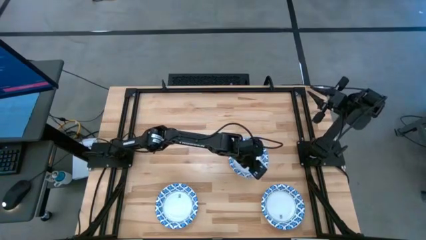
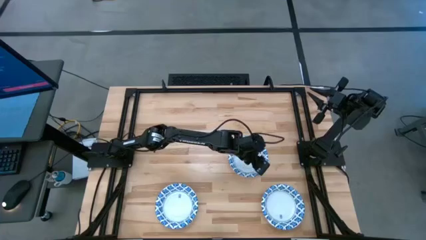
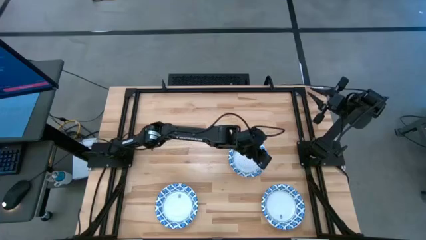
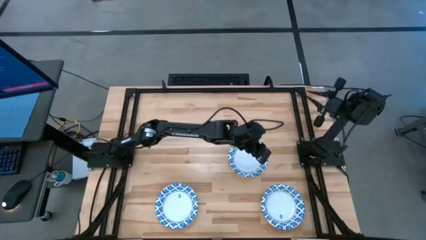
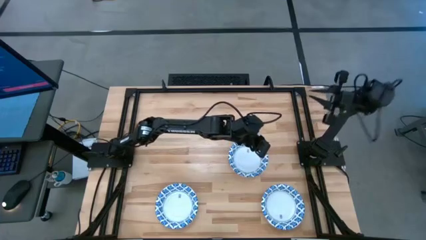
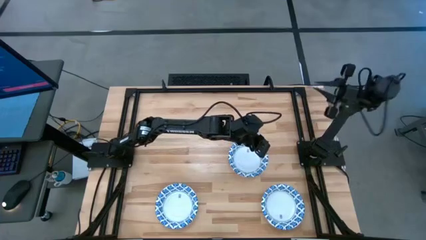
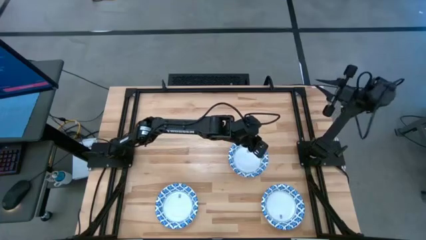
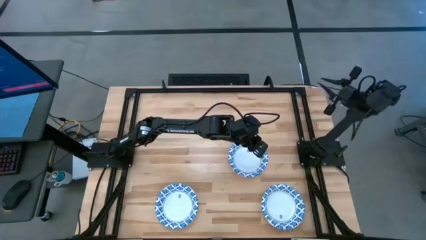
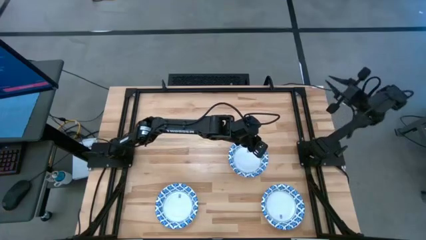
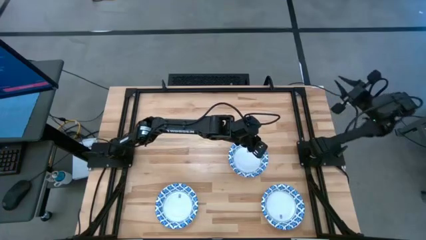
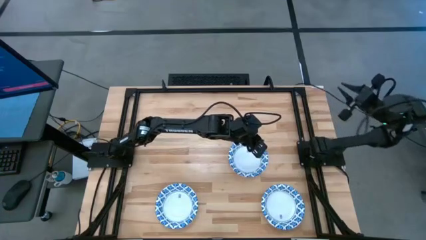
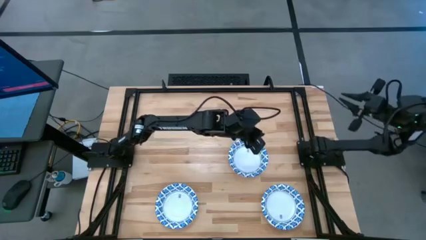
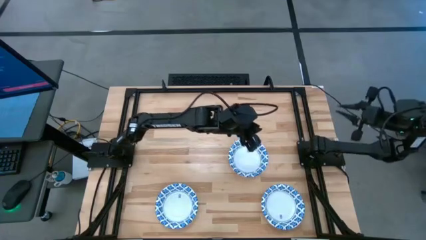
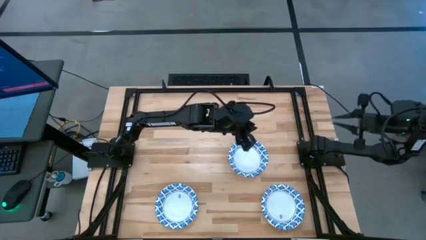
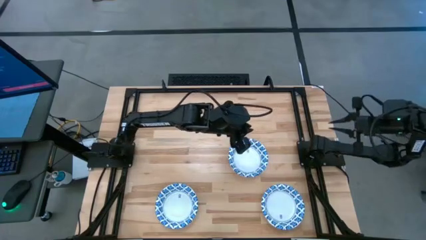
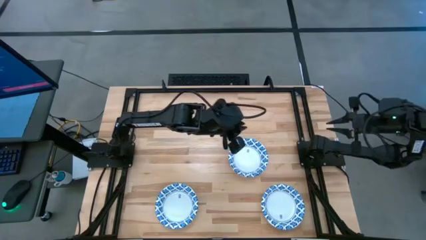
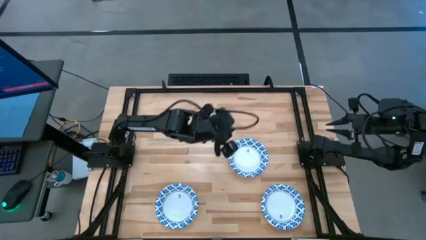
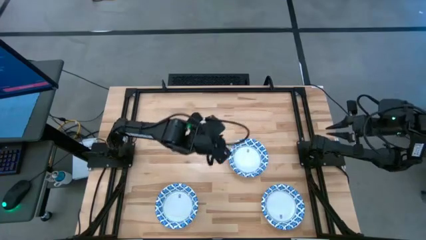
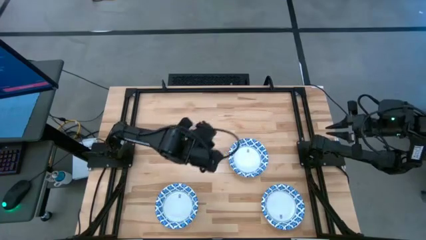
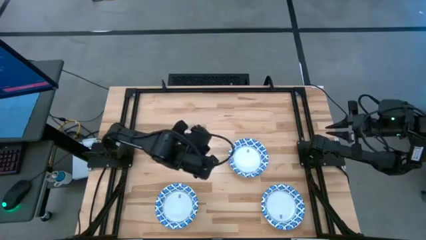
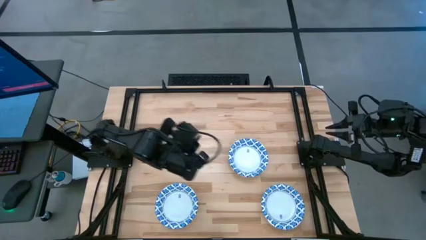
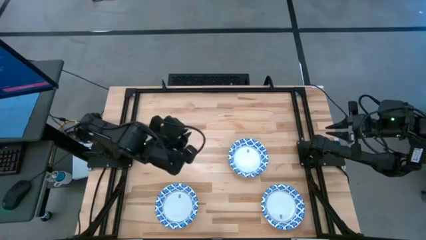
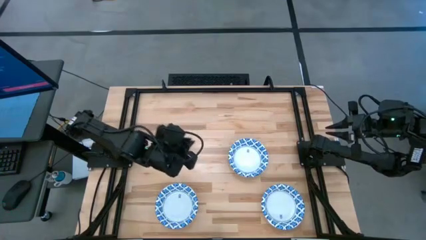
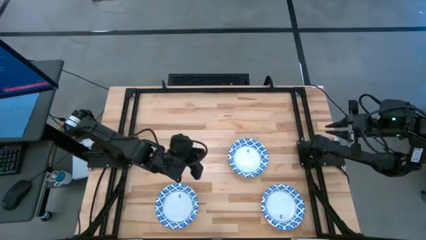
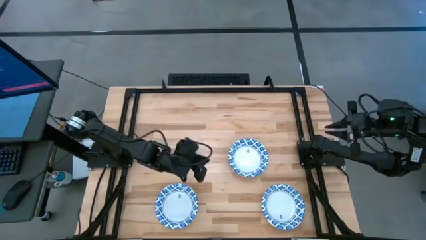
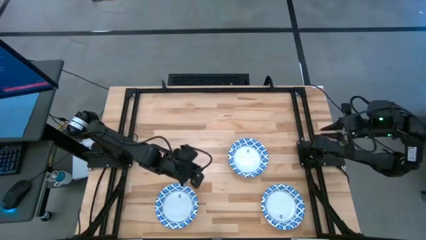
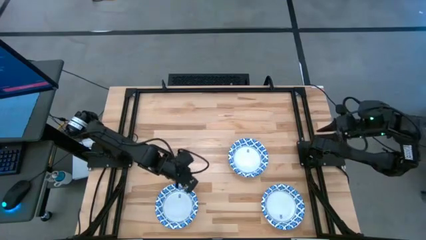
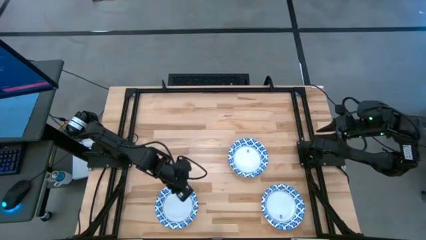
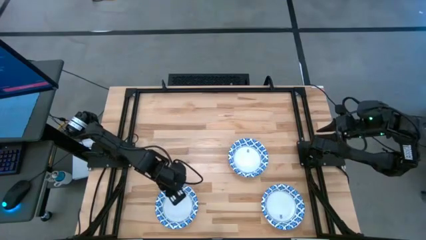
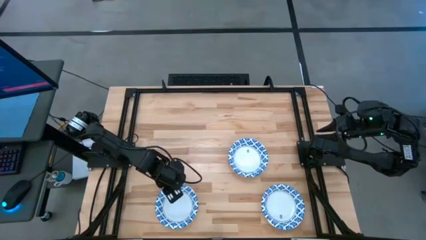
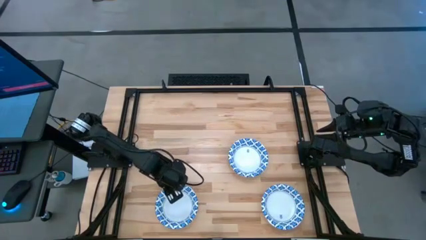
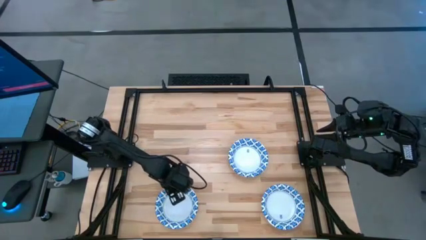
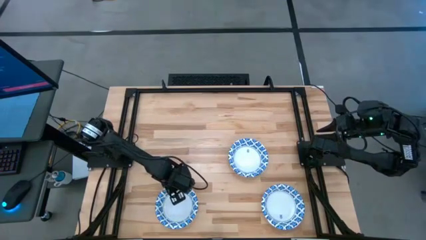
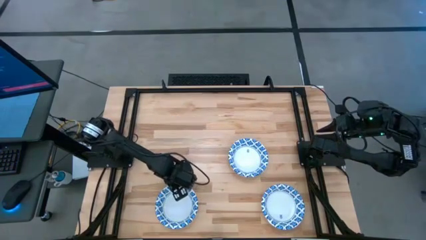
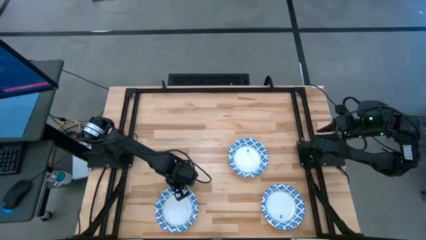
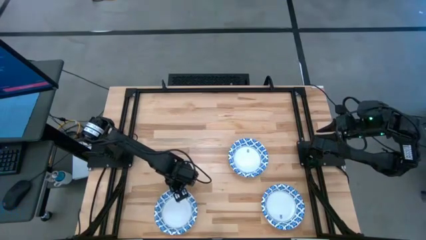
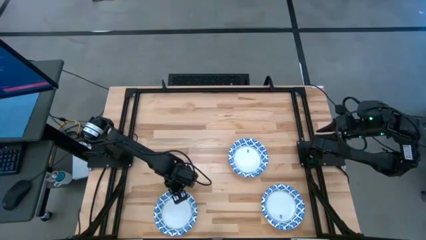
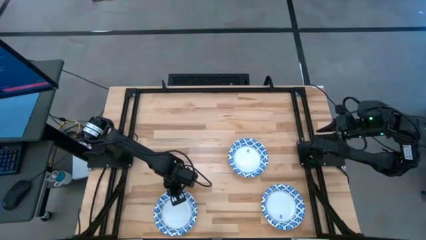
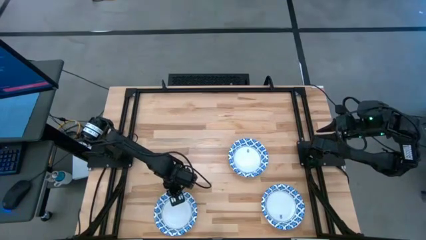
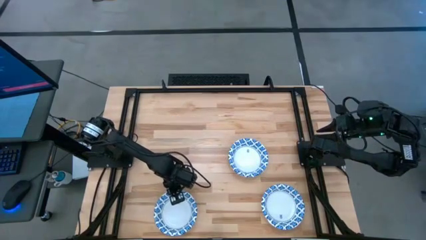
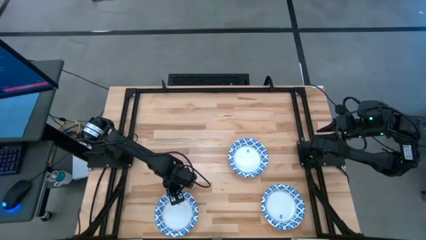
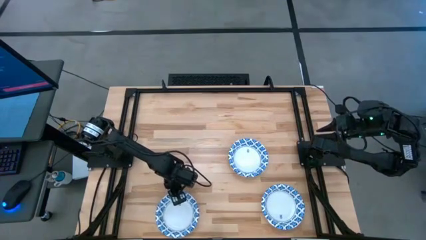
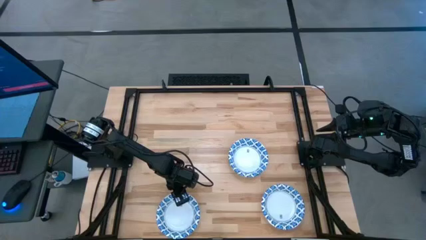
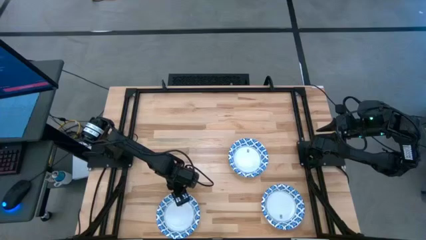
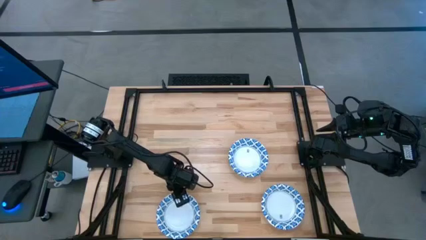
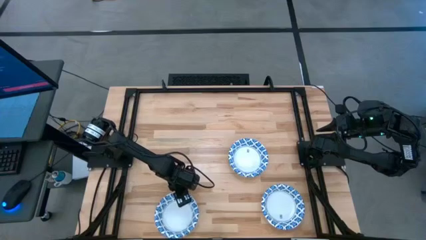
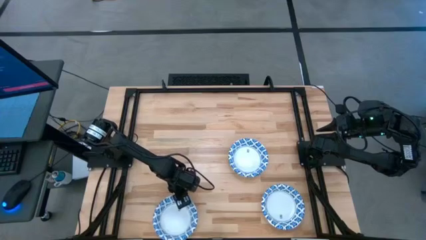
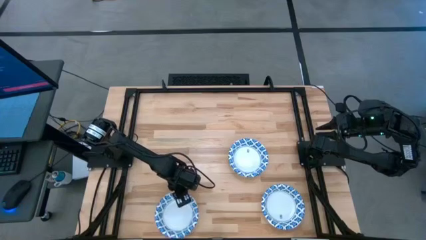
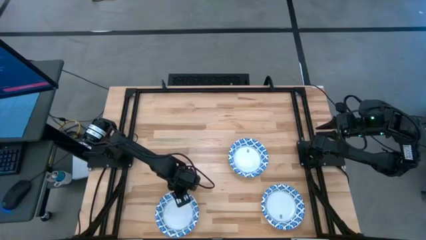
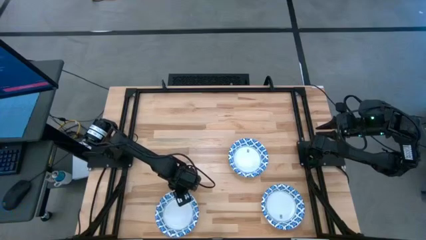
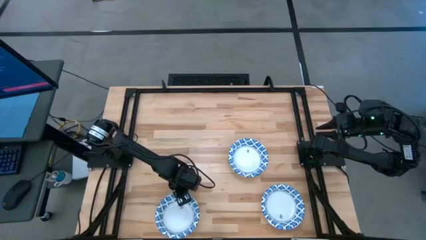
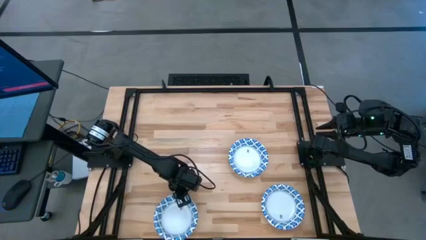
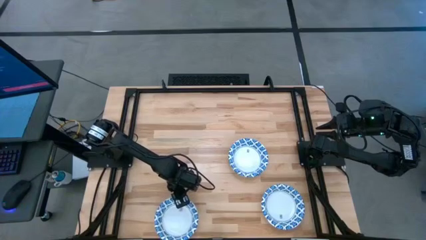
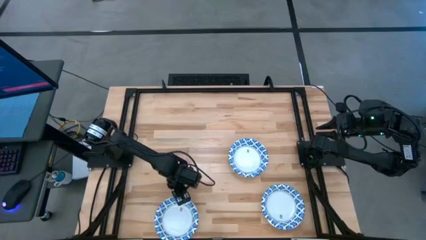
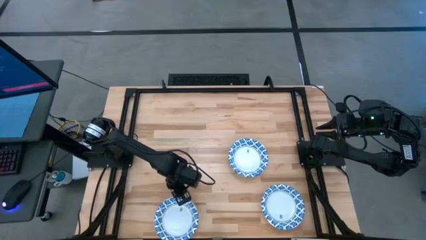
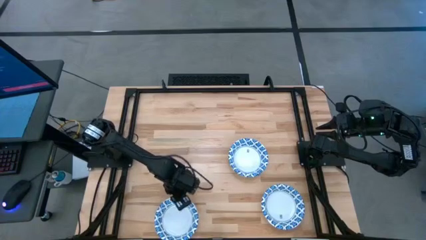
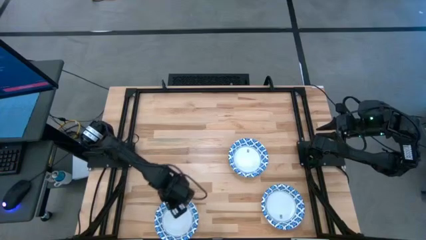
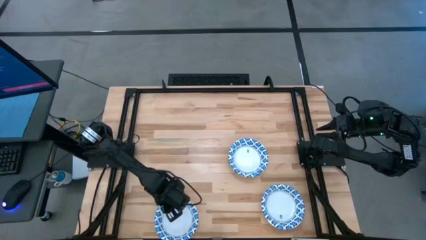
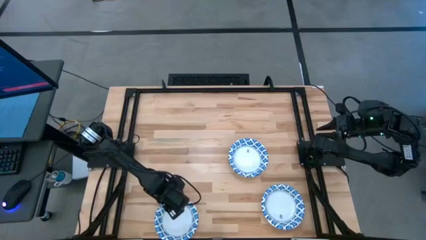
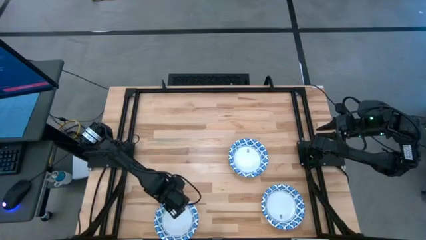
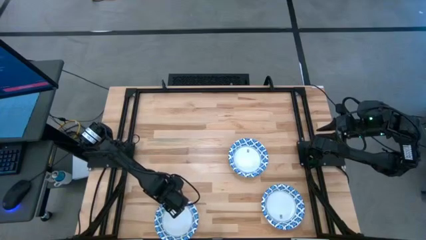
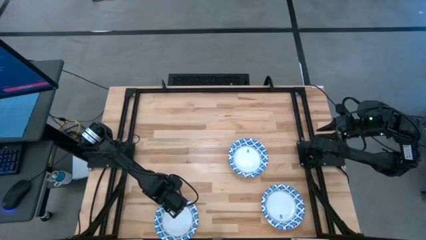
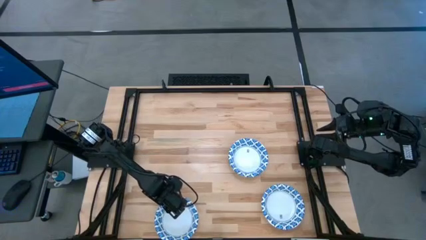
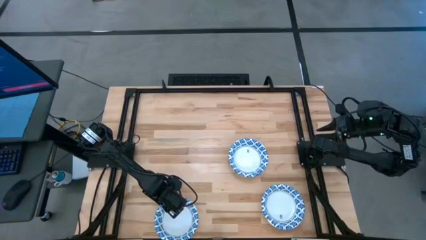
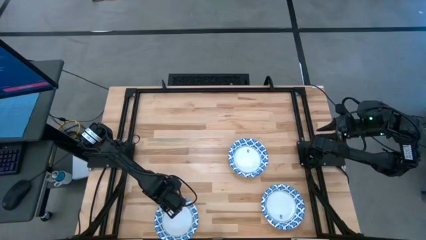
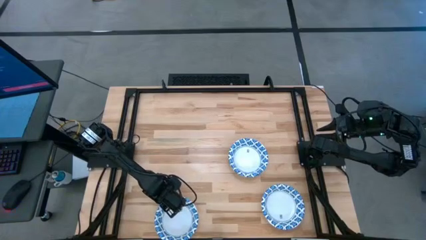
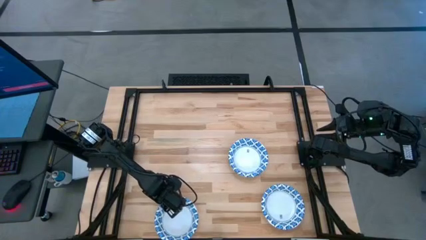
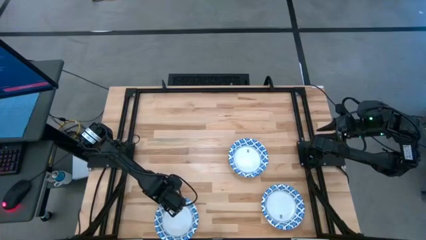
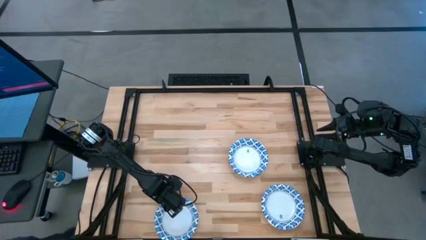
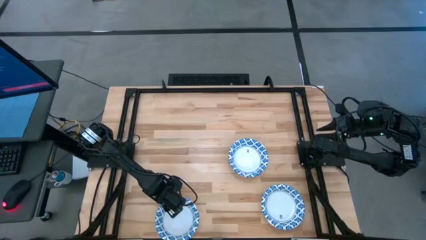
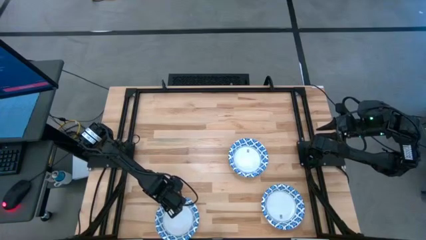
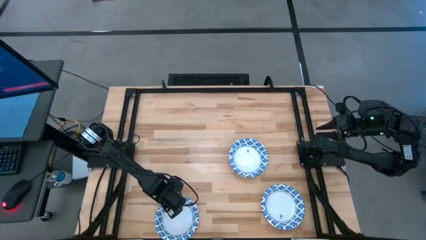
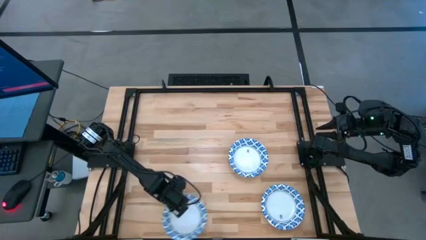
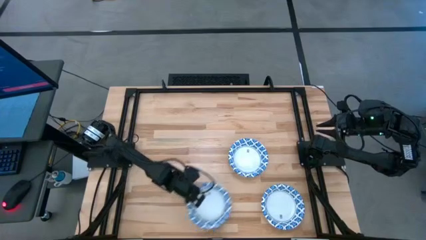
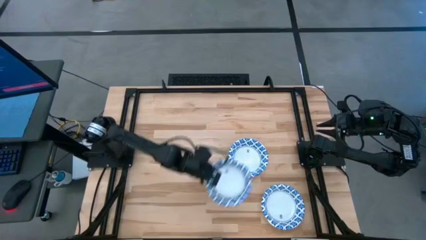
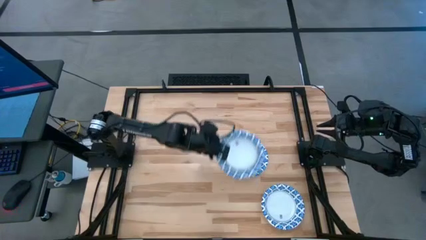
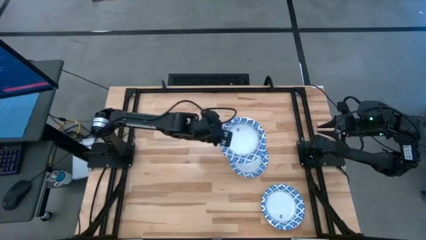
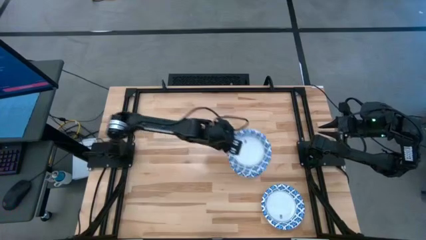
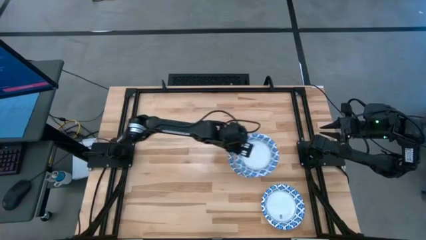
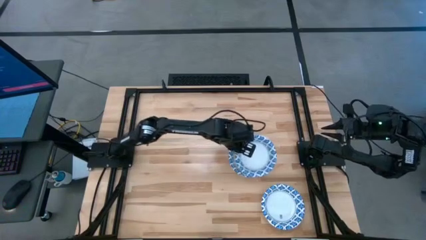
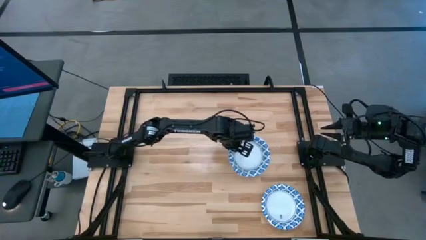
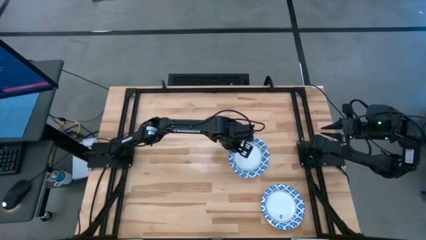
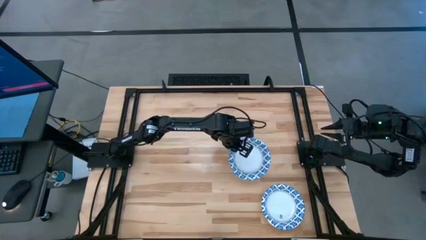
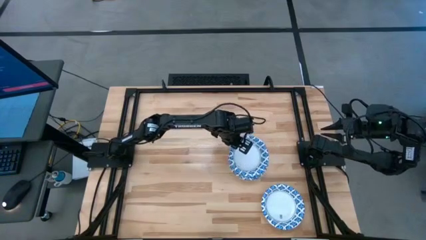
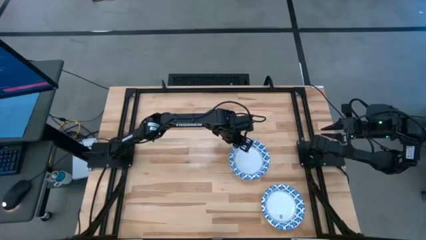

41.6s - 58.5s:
Task: Nest bowls inside each other
Stack the white bowl on top of the other white bowl
